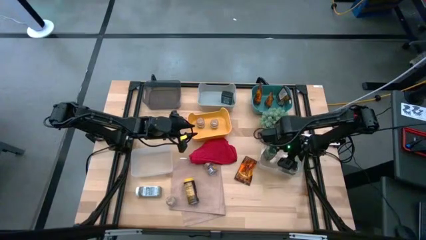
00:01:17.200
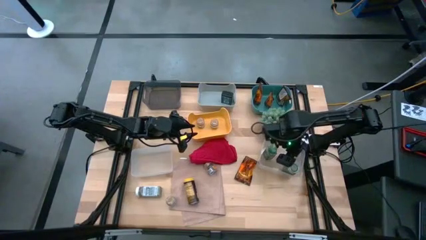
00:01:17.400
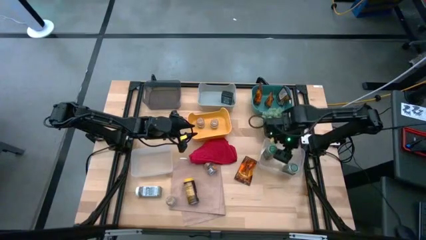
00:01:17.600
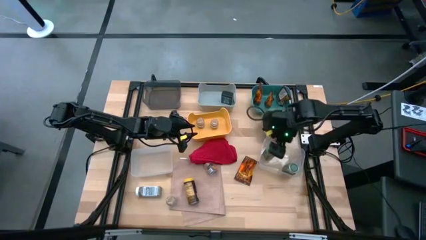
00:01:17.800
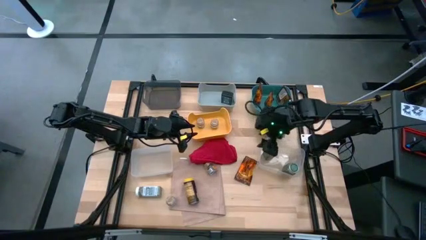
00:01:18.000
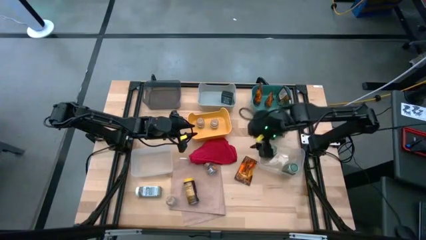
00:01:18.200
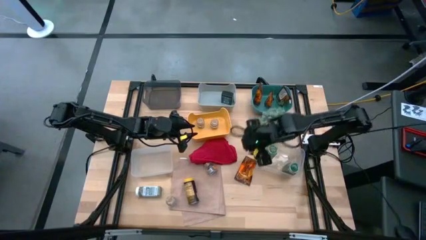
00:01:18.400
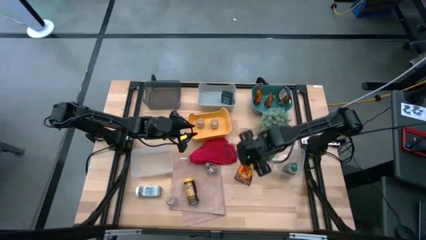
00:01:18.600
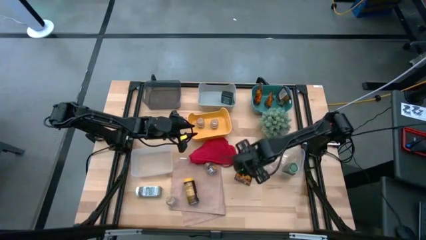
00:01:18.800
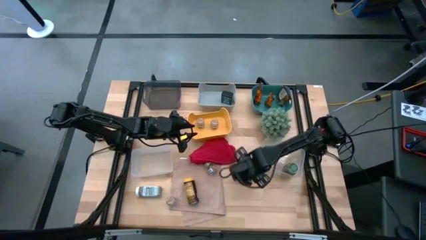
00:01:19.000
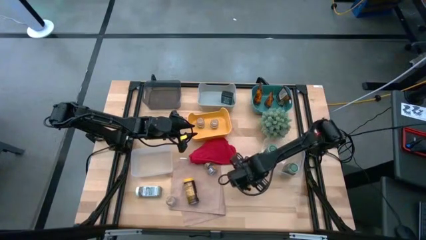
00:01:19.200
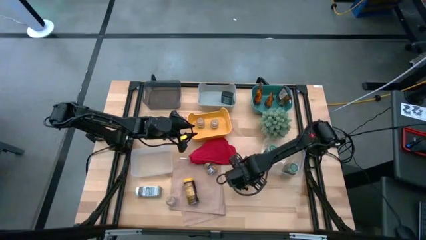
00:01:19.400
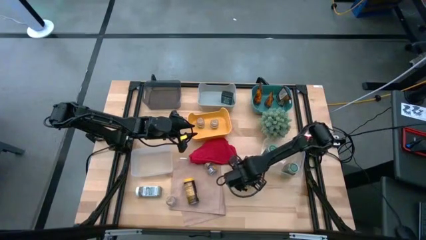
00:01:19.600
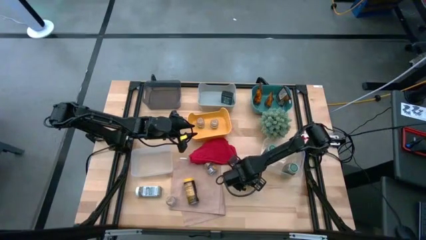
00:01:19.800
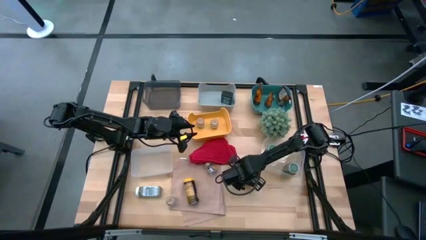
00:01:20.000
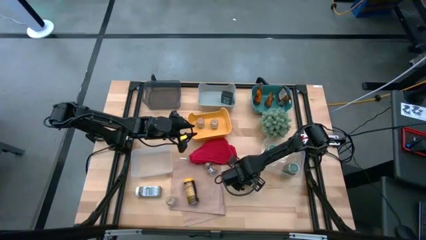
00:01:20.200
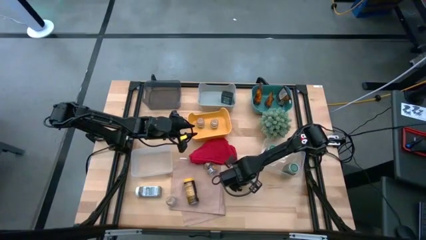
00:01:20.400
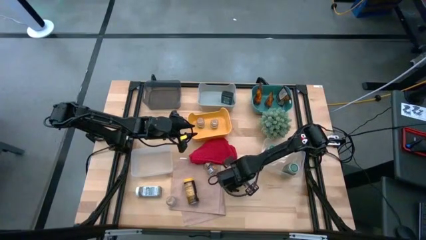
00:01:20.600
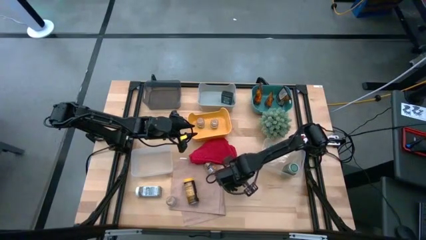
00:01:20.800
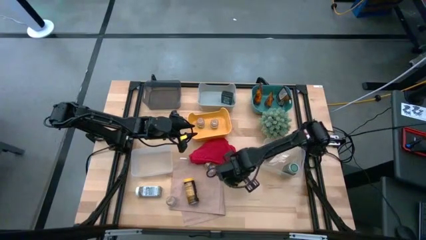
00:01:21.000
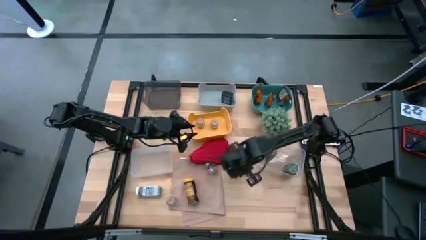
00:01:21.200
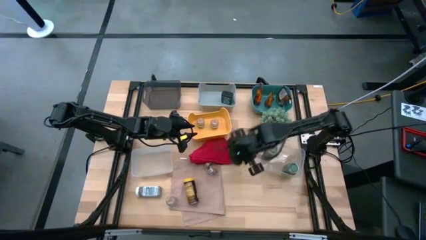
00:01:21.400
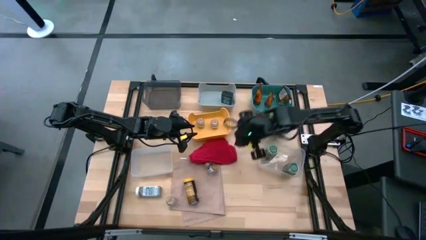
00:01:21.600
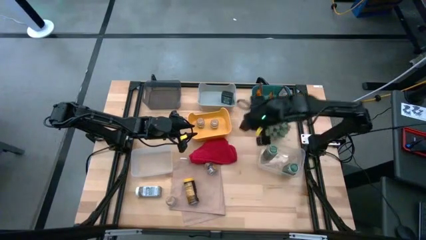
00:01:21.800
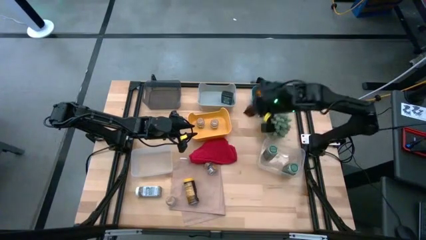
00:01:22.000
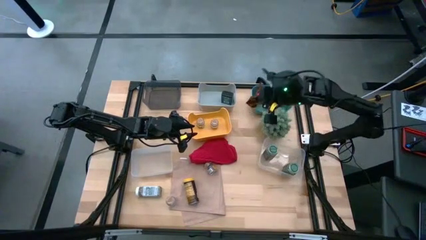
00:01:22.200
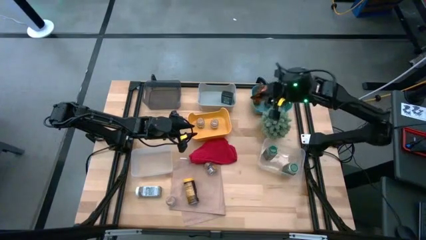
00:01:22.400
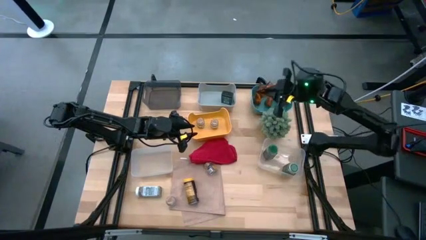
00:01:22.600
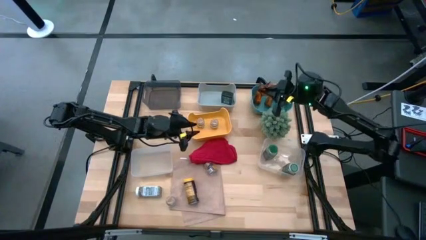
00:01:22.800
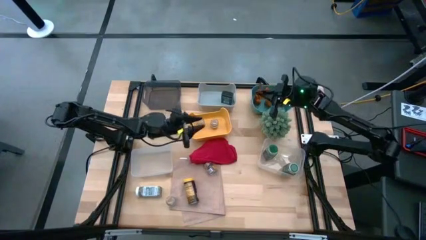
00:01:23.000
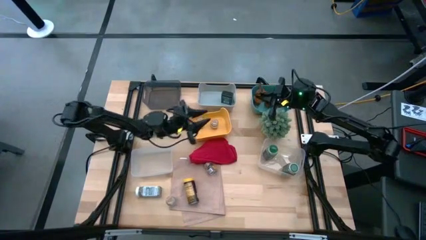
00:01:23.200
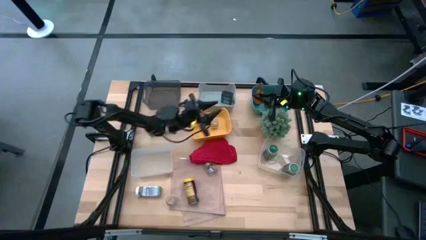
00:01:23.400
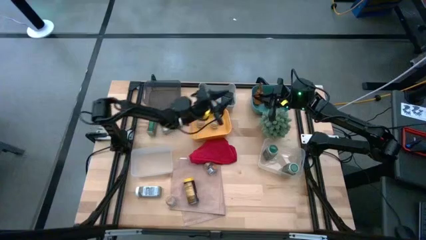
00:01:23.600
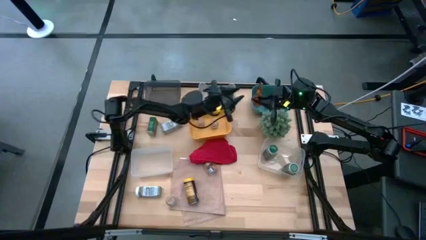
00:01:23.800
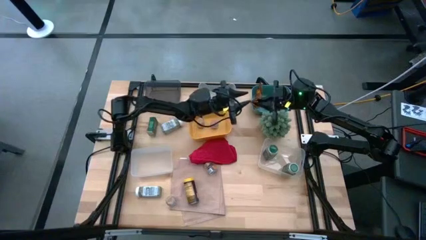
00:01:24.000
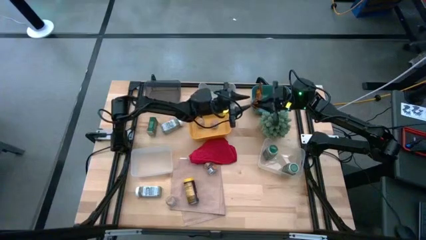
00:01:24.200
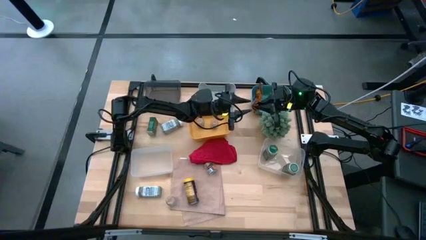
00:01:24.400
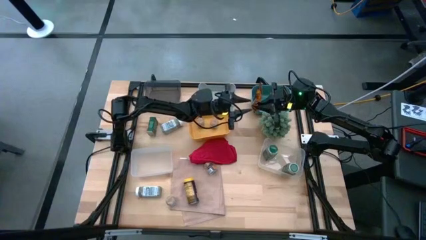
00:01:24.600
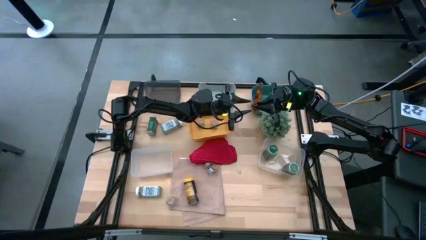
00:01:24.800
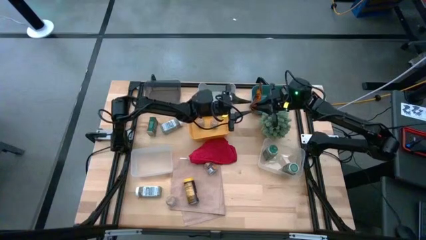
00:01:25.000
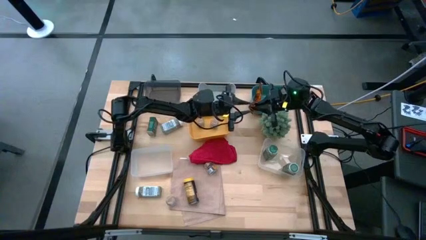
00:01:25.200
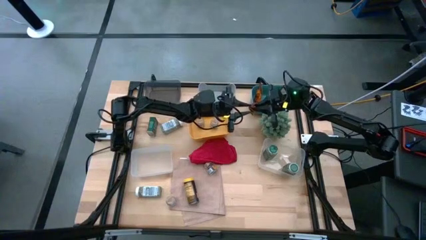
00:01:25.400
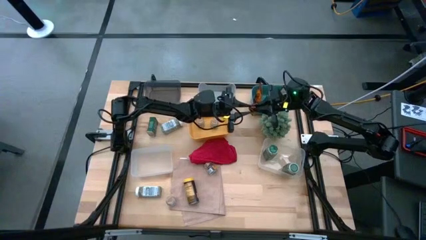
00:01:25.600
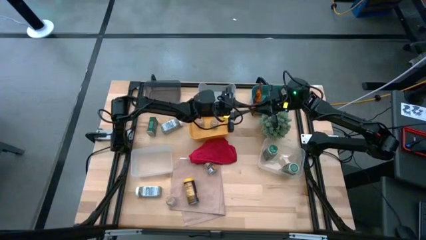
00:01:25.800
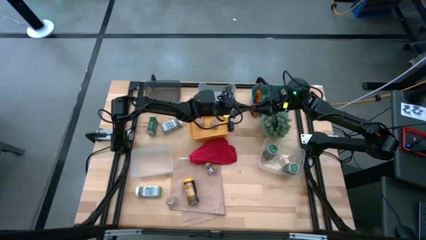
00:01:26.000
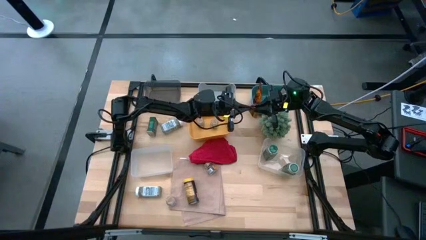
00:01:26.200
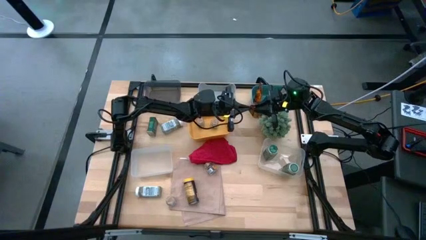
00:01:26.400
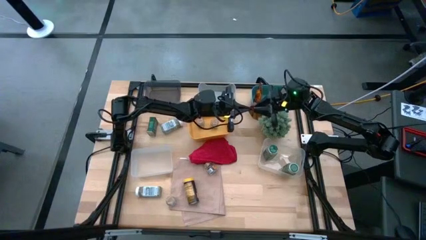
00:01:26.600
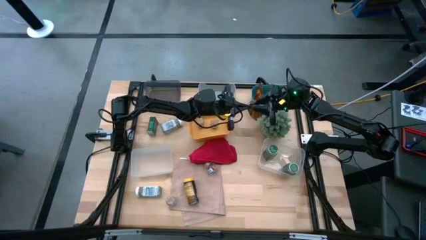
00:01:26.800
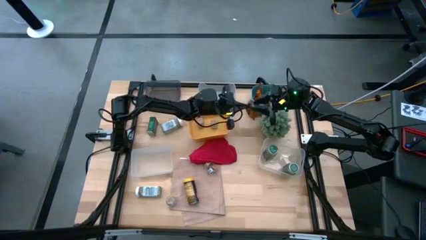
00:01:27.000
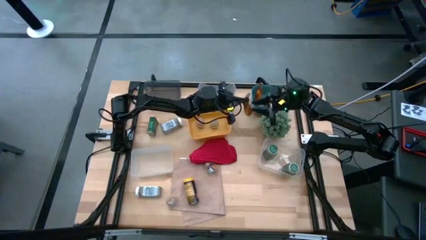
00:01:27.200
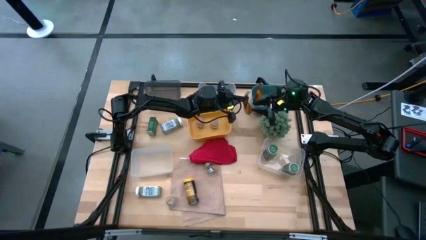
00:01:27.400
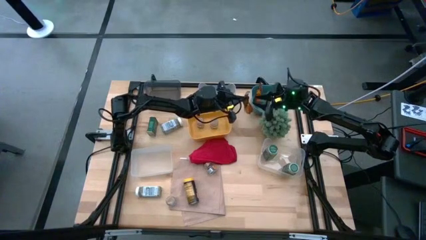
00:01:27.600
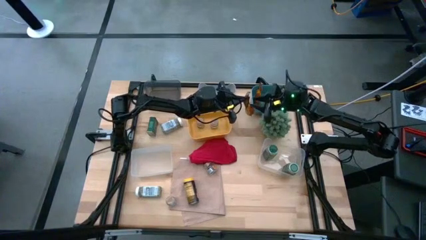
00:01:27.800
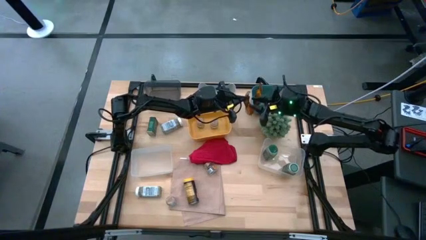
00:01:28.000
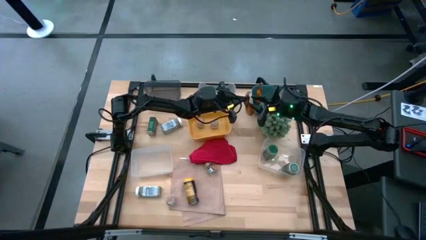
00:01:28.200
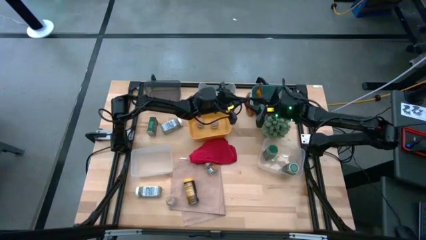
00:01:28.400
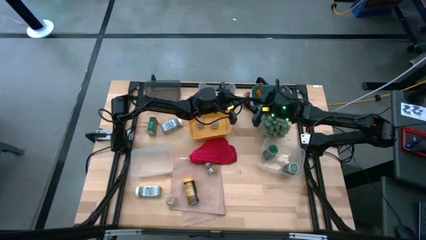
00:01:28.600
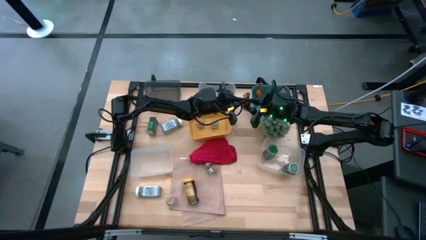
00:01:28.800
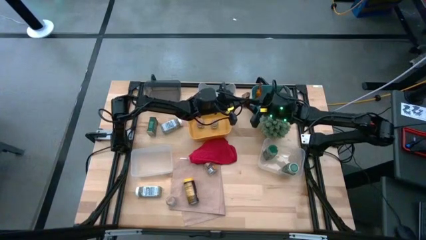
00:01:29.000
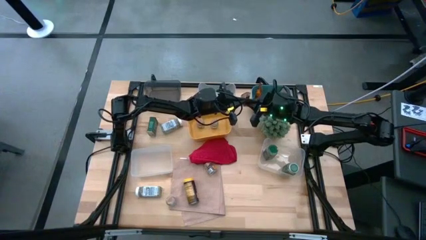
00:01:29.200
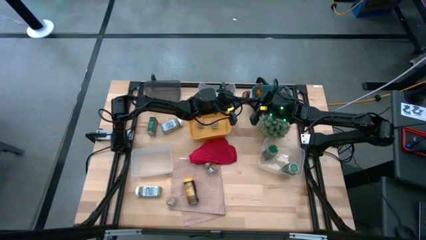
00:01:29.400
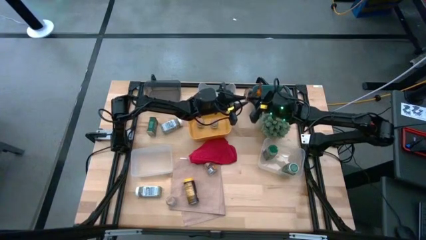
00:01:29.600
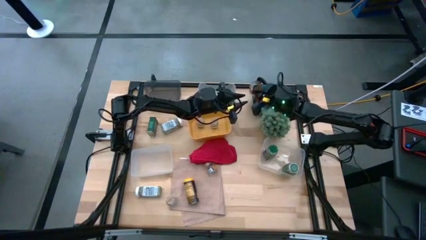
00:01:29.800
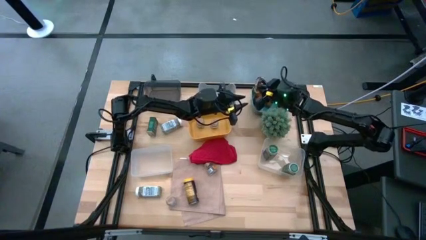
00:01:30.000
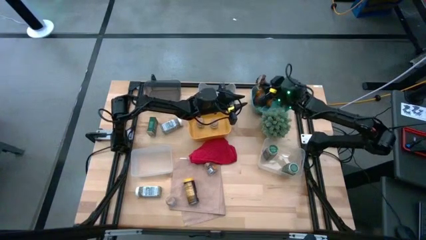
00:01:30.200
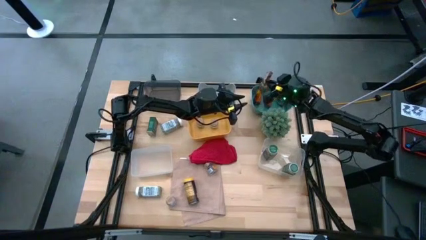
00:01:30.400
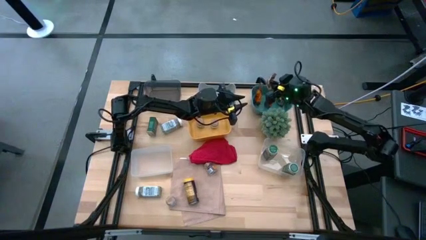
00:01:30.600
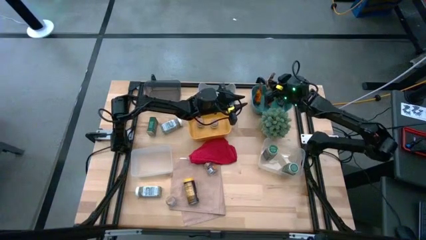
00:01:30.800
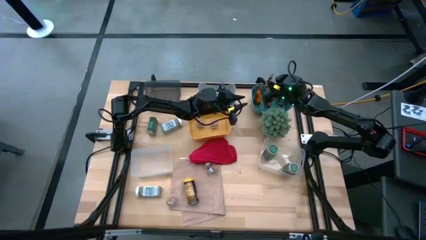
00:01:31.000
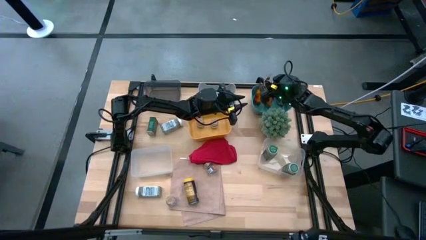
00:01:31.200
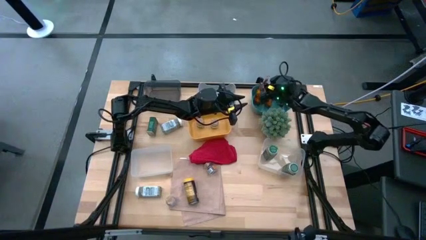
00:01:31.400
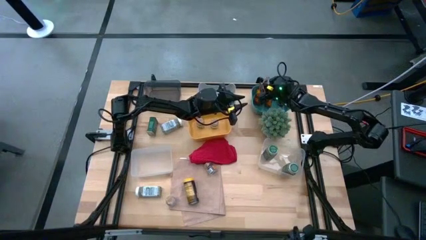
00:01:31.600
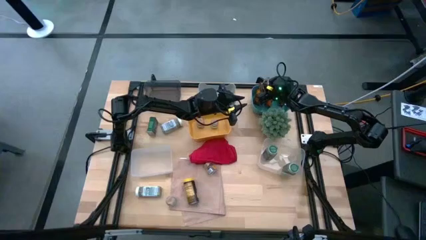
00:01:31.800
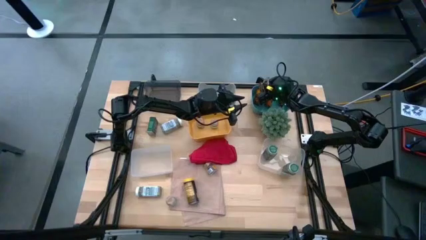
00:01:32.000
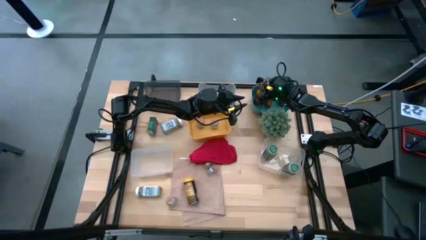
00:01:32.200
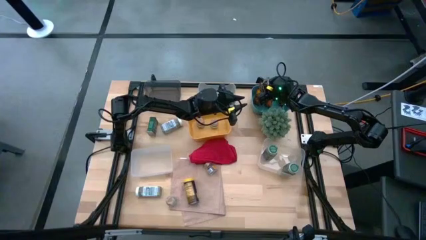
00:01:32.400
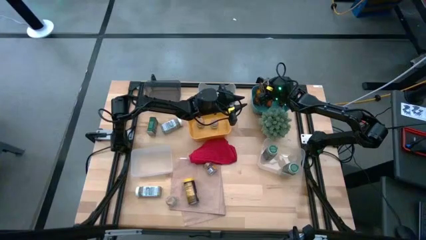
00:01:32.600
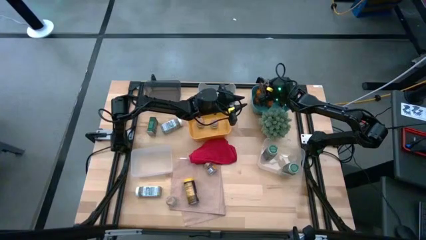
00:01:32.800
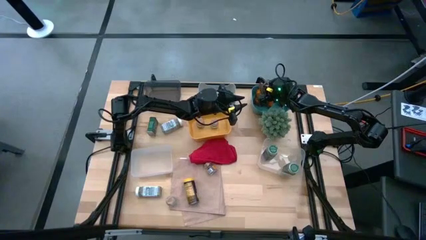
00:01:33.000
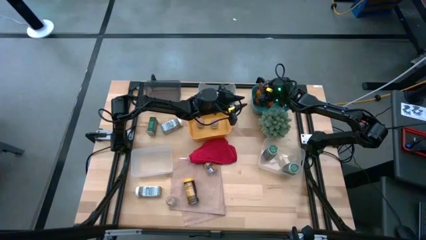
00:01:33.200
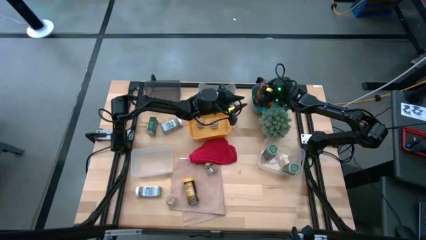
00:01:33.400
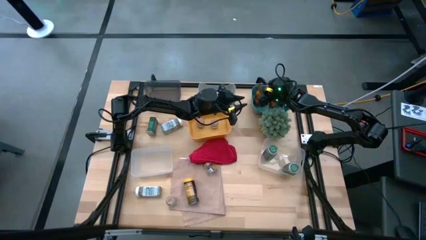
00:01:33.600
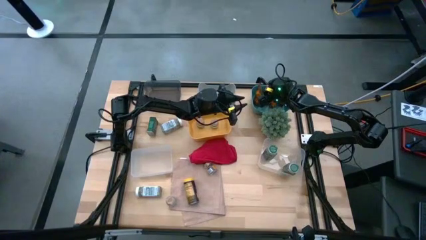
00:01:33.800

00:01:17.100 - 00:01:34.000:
Task: Sort spices by type
Put the brown seasoning pack into the green bin
